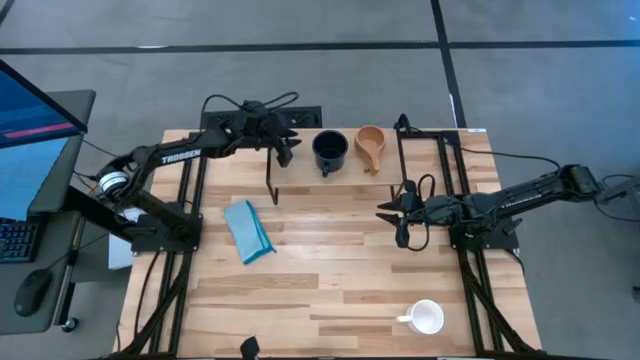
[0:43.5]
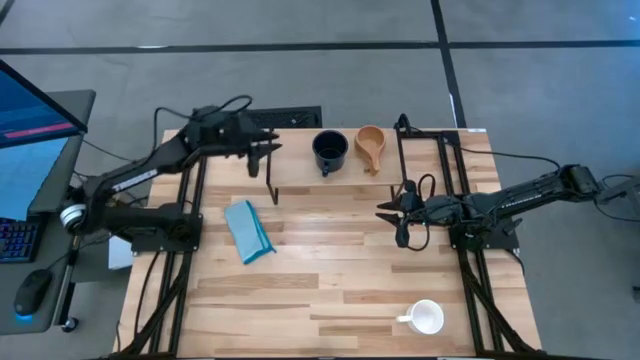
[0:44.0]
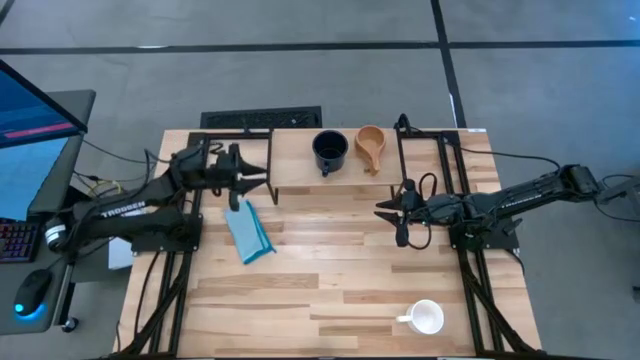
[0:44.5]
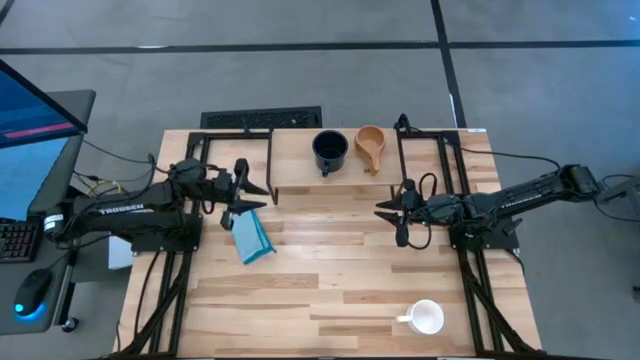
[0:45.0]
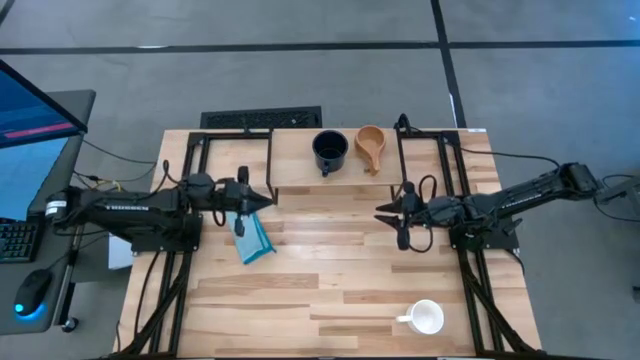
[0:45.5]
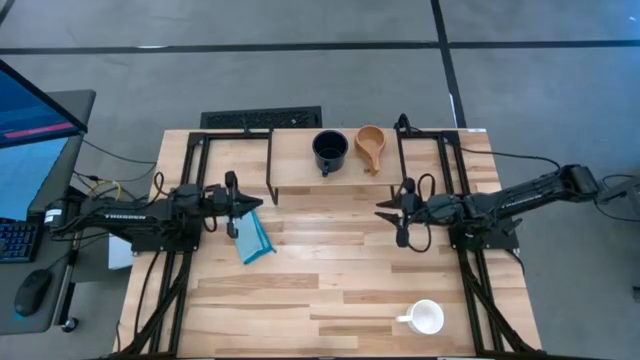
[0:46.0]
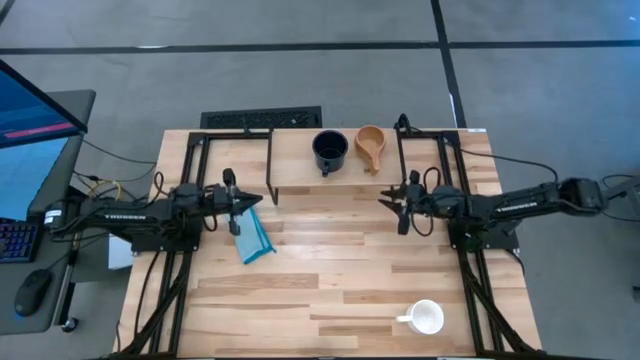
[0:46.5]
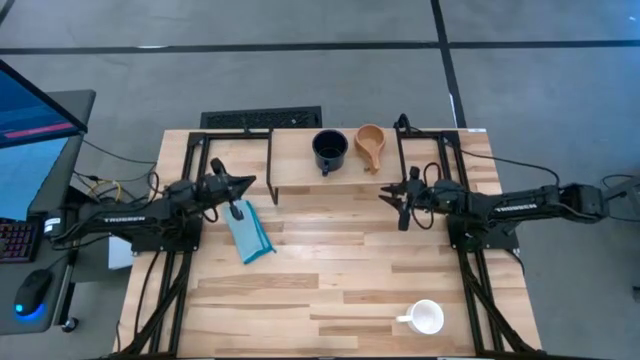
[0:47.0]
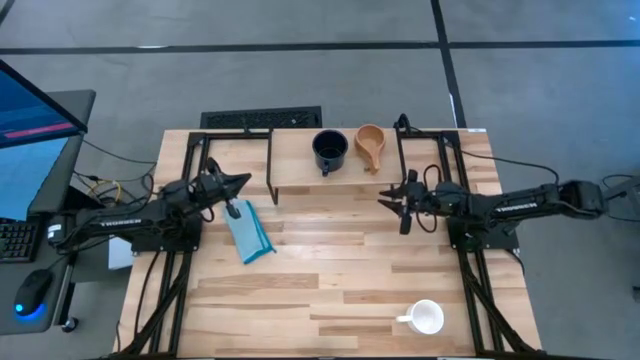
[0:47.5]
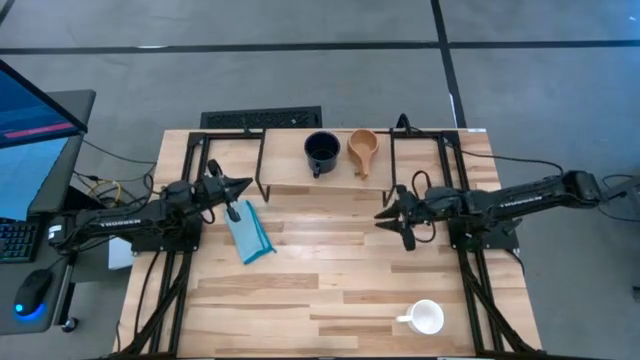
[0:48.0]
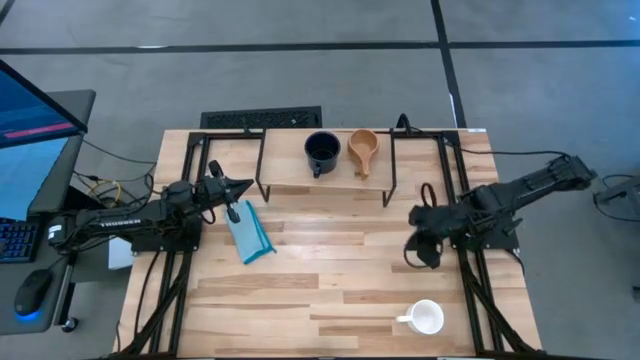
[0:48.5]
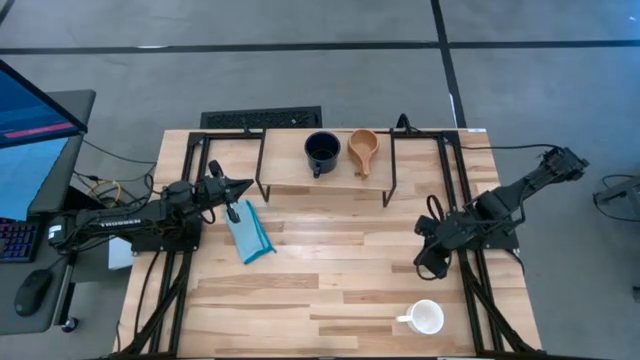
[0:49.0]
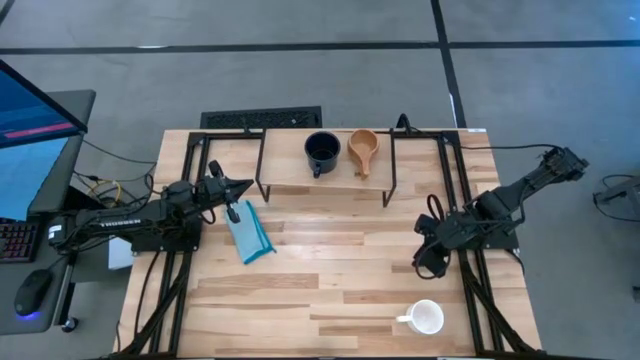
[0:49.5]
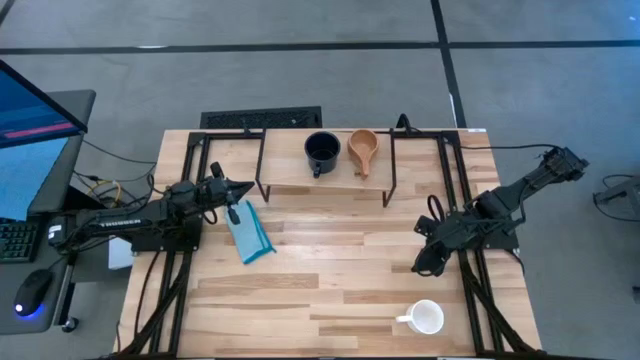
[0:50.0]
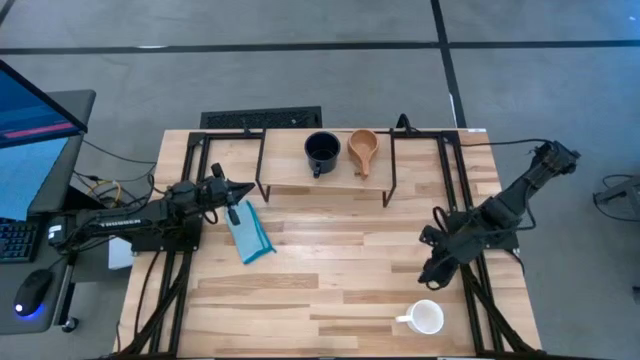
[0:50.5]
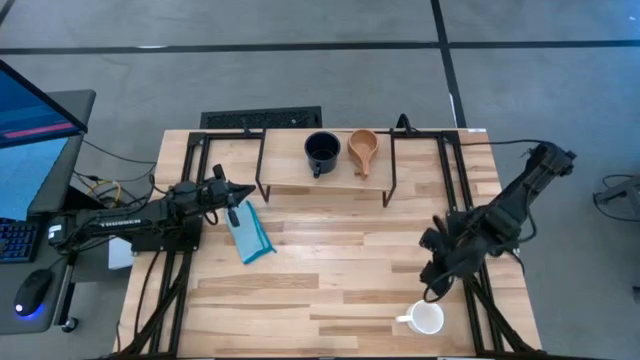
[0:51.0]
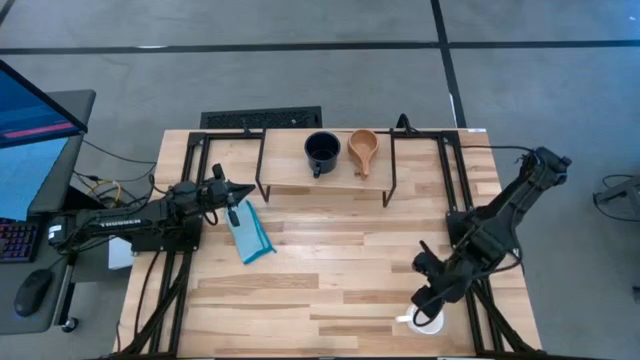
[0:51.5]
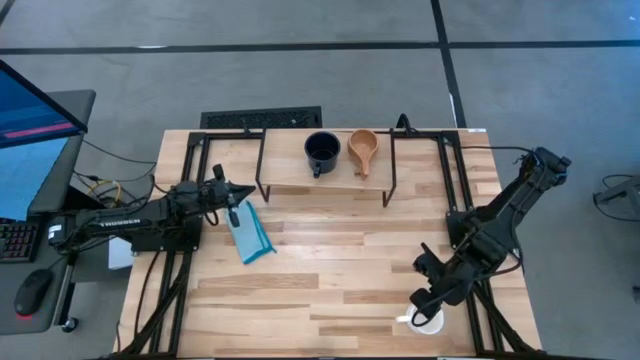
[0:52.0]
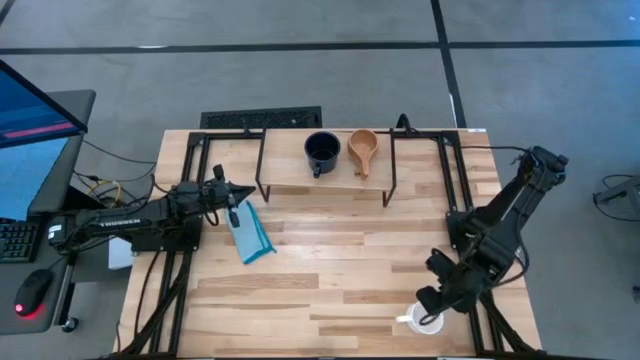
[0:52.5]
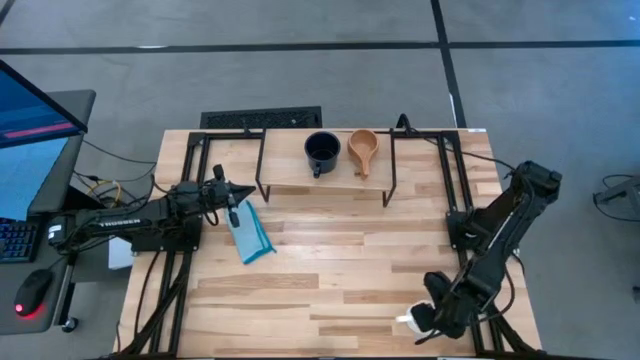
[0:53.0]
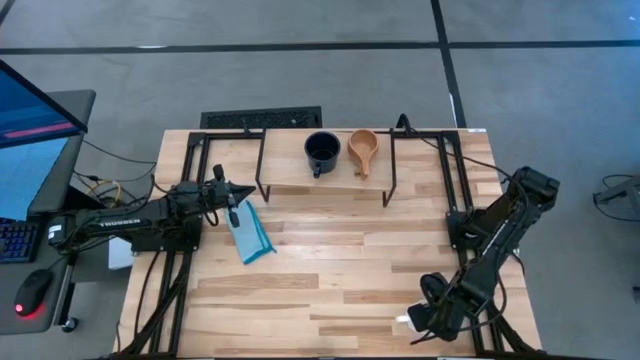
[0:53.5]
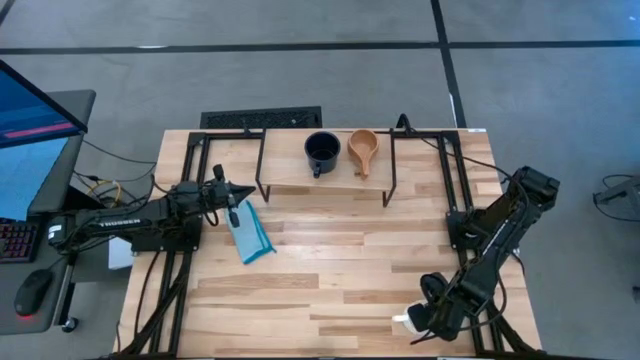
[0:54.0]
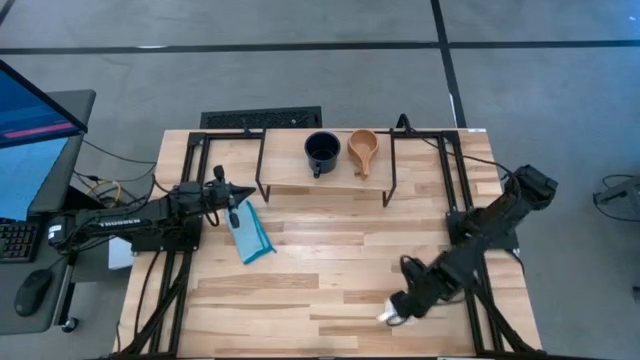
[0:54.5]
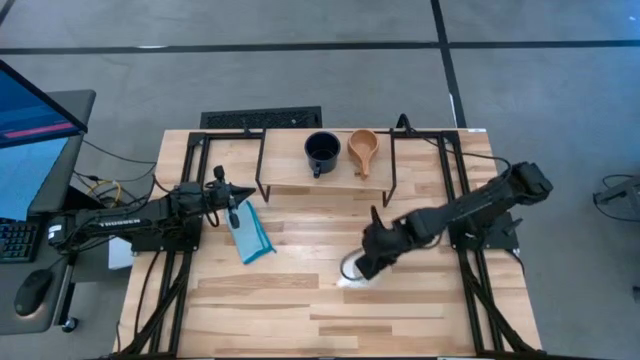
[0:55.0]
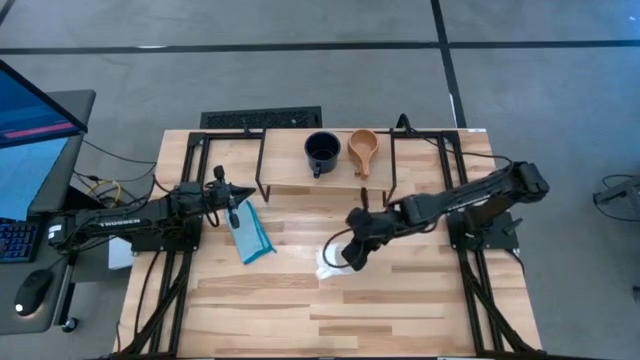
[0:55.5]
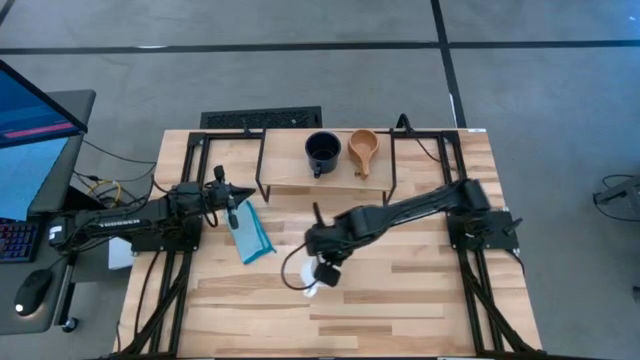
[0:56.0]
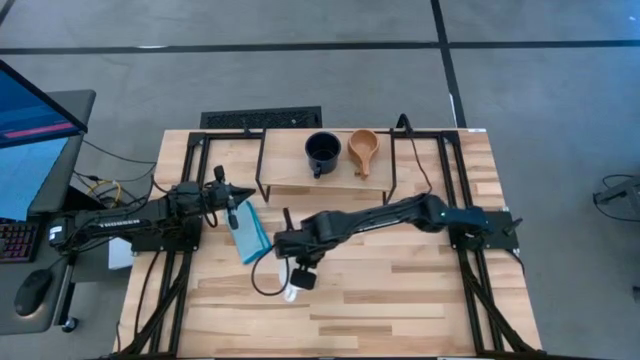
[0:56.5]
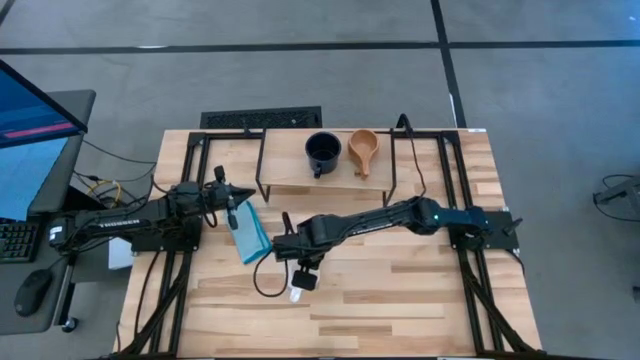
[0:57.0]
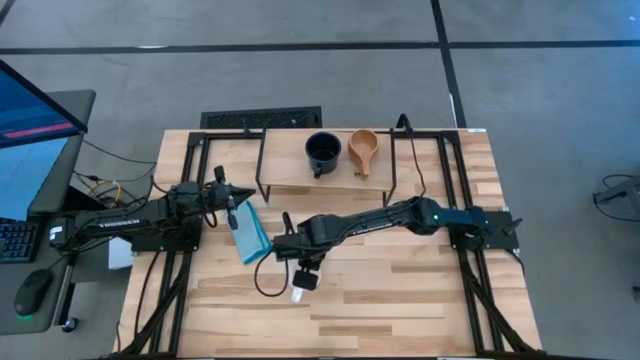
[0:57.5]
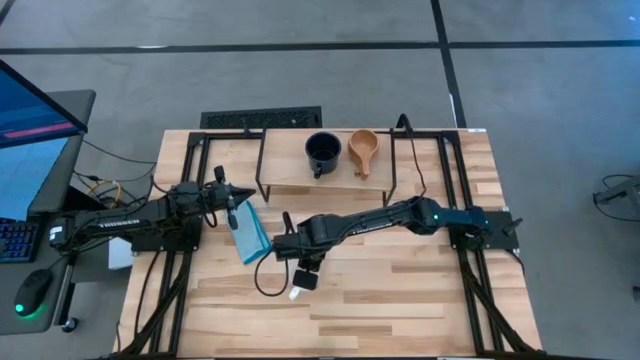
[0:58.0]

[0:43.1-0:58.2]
Task: Stack small to large cups/mugs on shelf
Put the white mug on the shelf

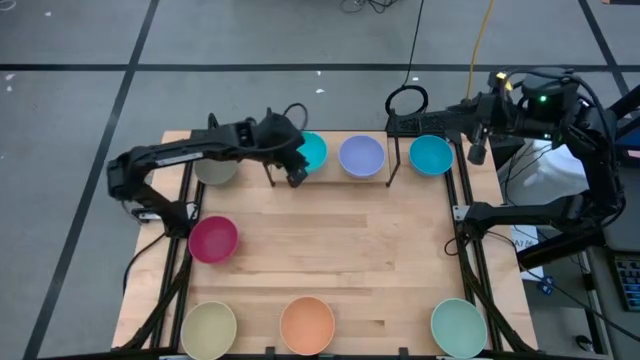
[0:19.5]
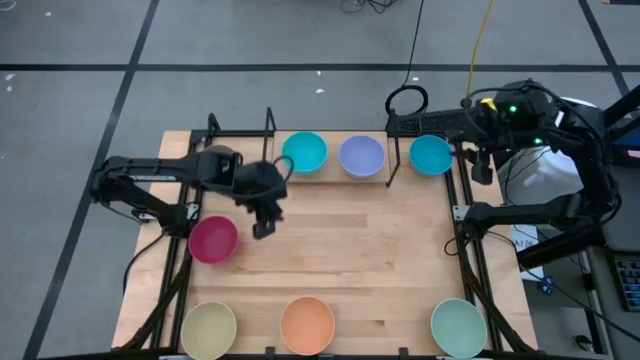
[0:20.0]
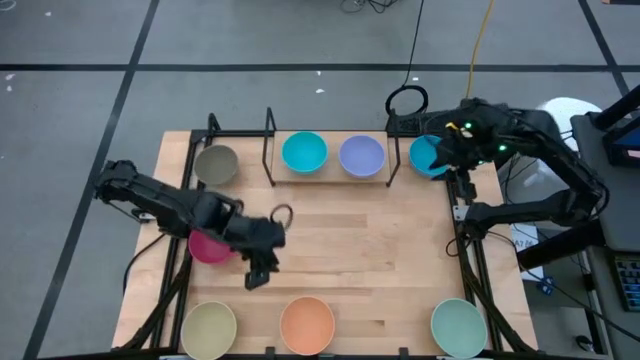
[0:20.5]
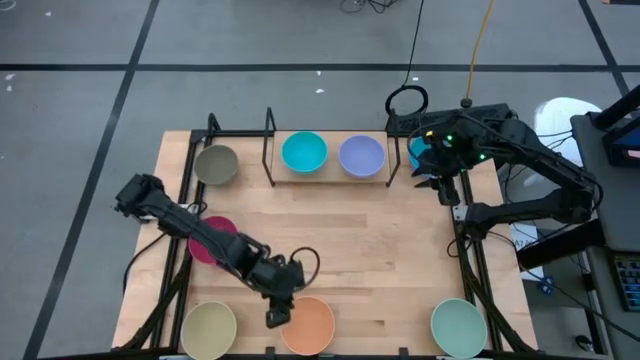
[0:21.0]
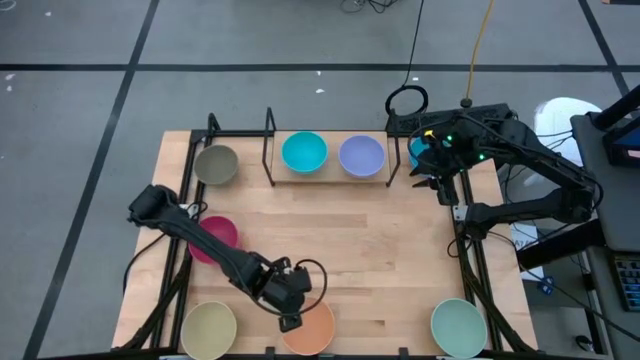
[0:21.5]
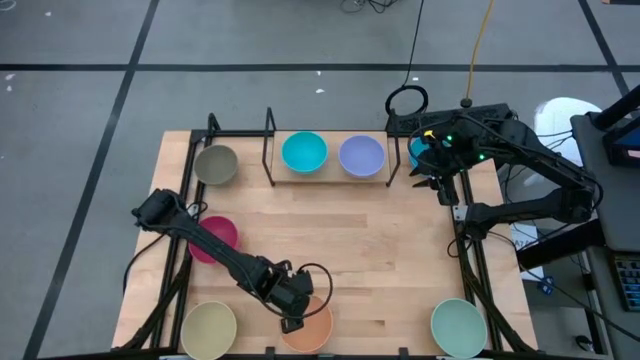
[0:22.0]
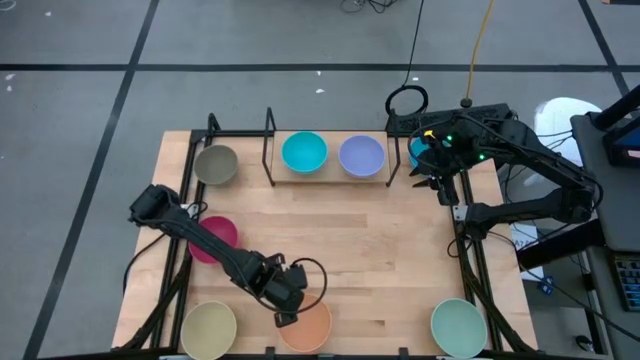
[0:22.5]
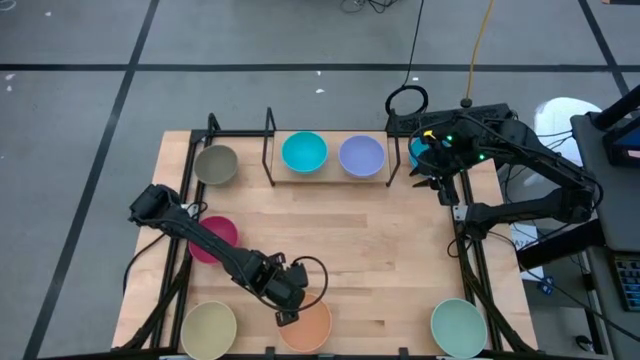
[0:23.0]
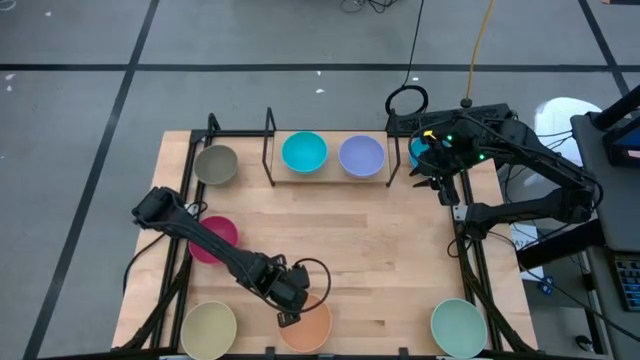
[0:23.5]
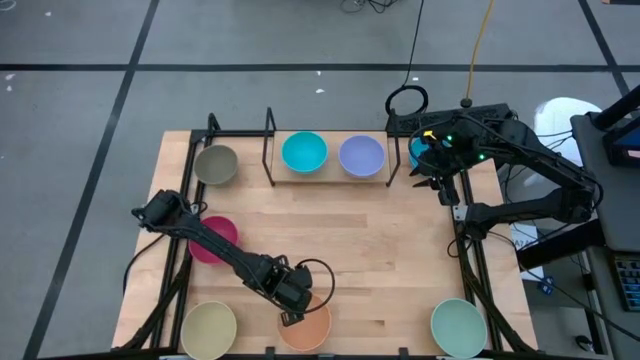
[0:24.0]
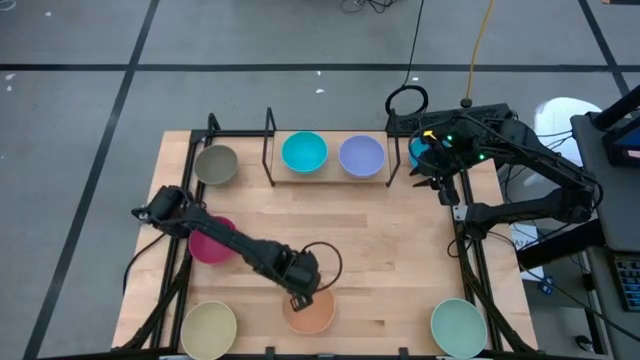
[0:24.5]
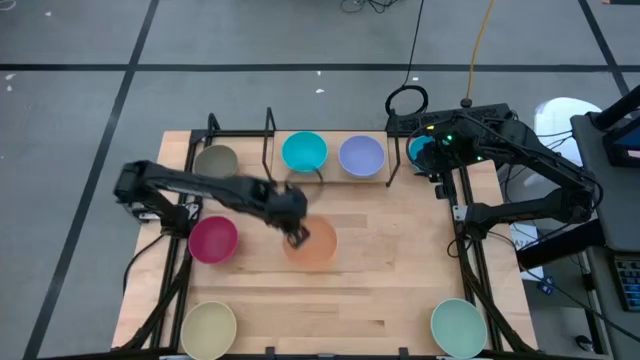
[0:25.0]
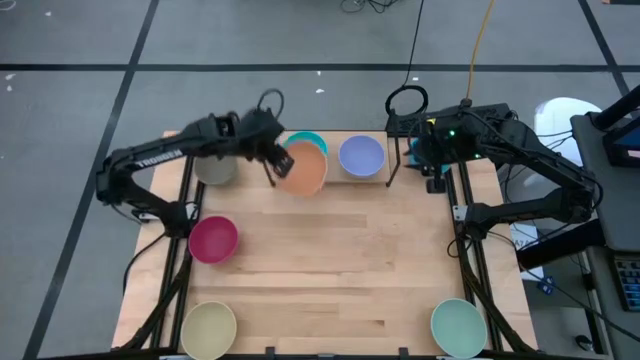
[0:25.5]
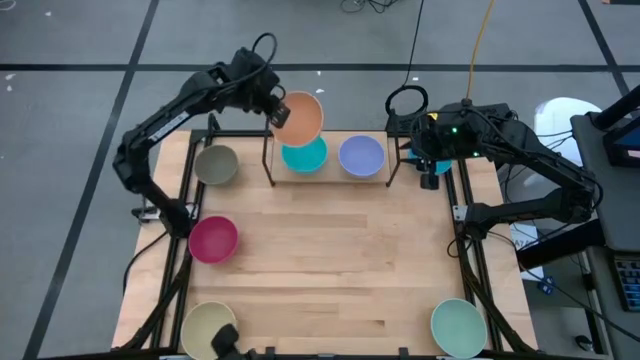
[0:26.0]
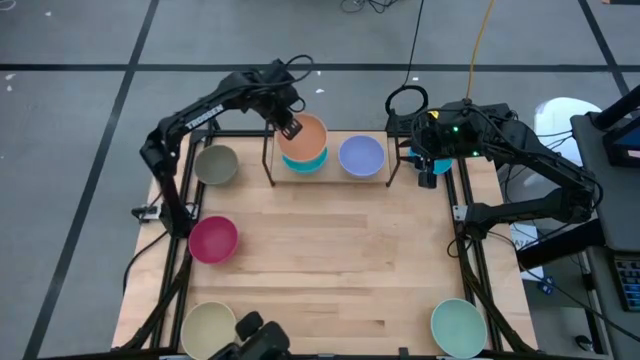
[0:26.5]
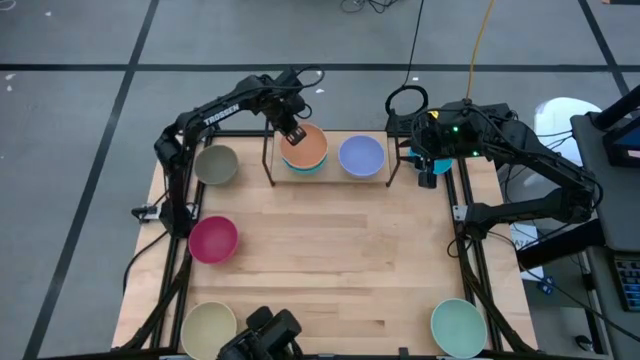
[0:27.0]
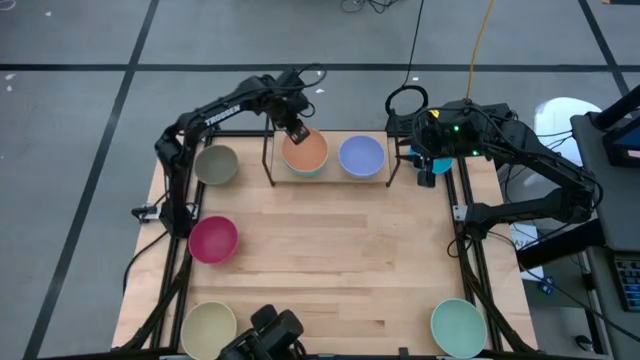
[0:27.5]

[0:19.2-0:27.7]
Task: Place and stack bowls onto a shelf
Stack the orange bowl on top of the blue bowl on the shelf
